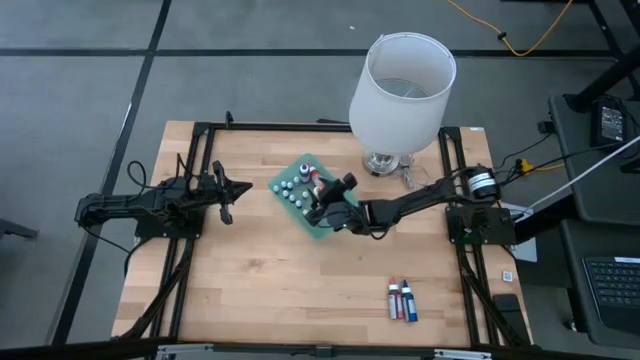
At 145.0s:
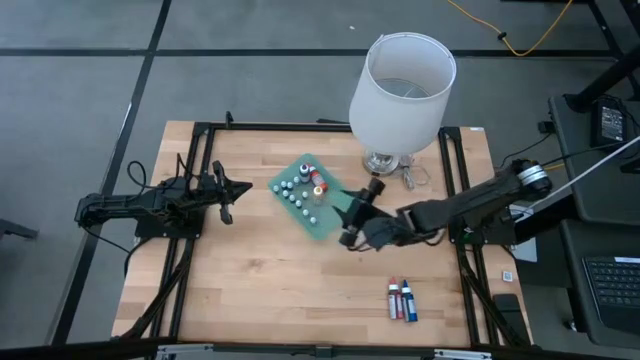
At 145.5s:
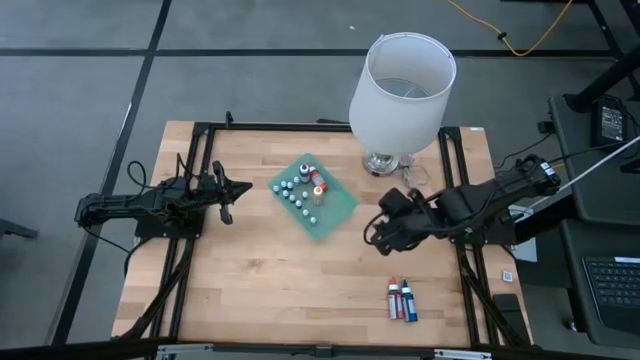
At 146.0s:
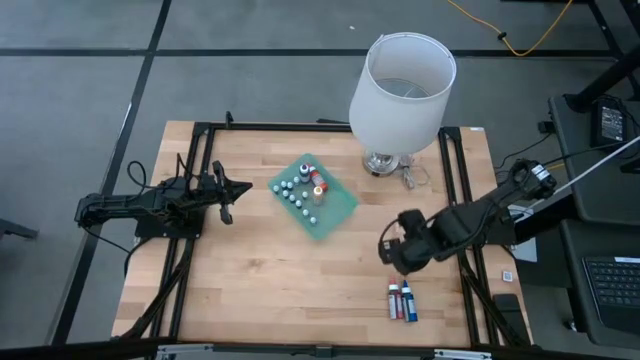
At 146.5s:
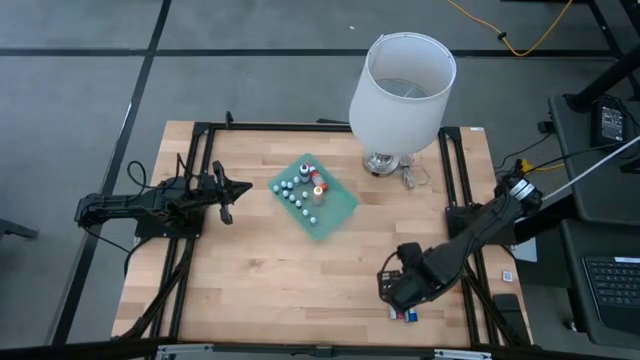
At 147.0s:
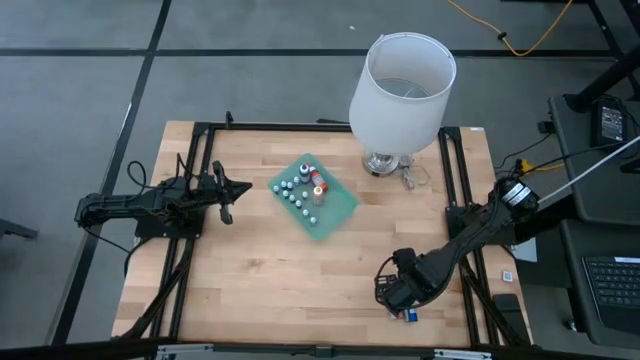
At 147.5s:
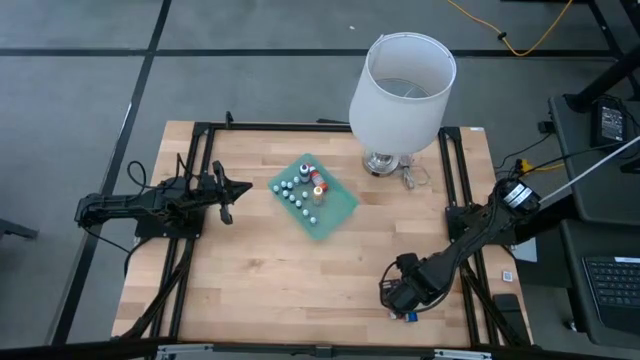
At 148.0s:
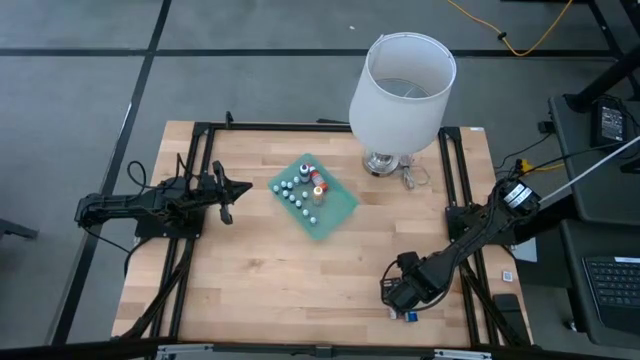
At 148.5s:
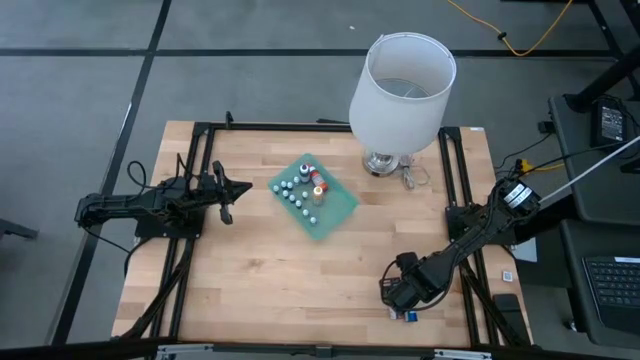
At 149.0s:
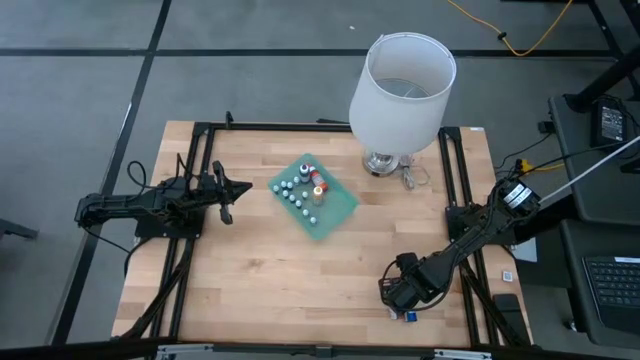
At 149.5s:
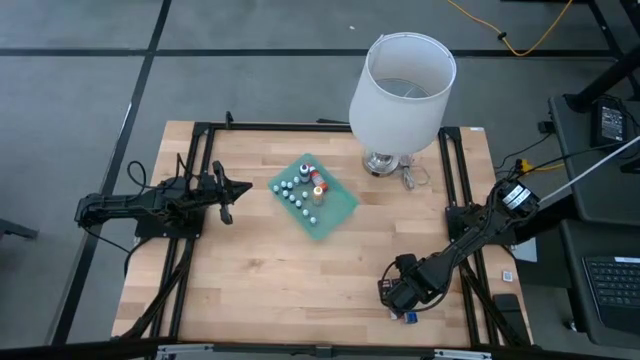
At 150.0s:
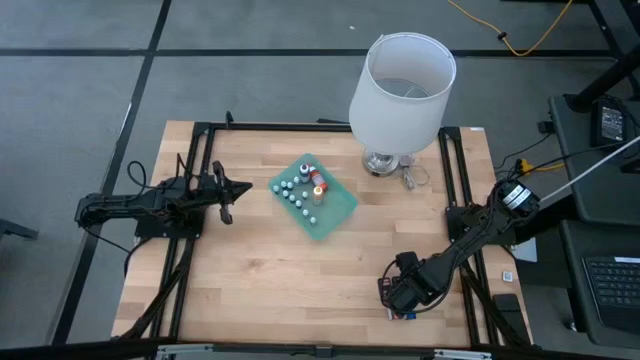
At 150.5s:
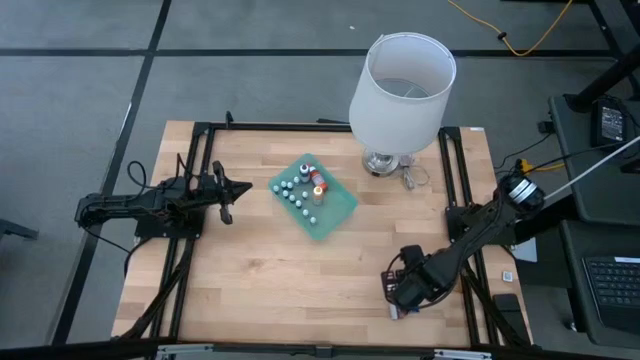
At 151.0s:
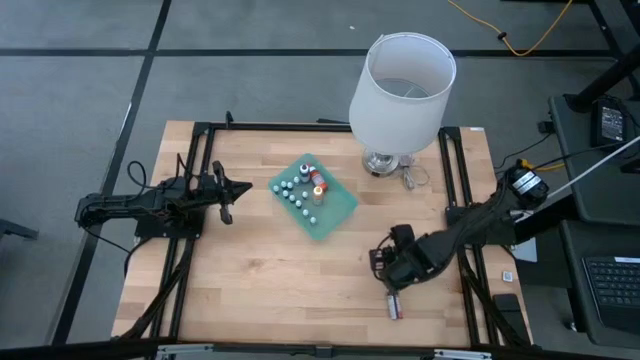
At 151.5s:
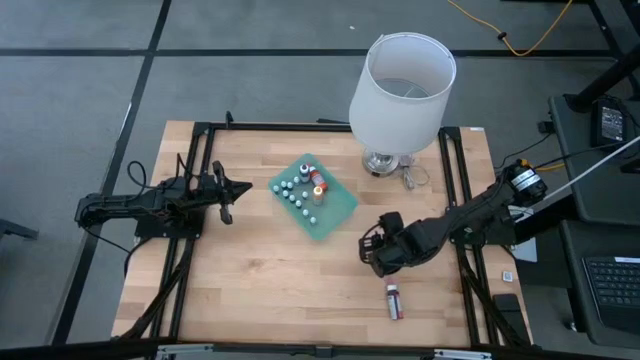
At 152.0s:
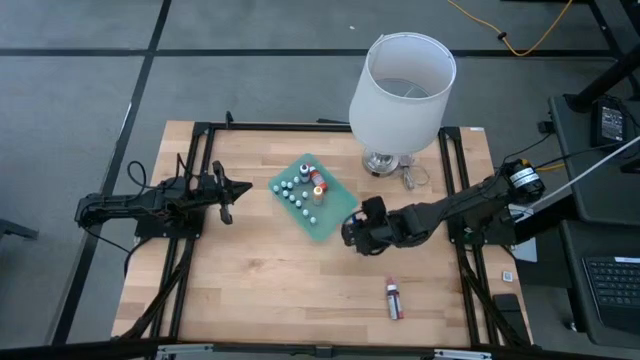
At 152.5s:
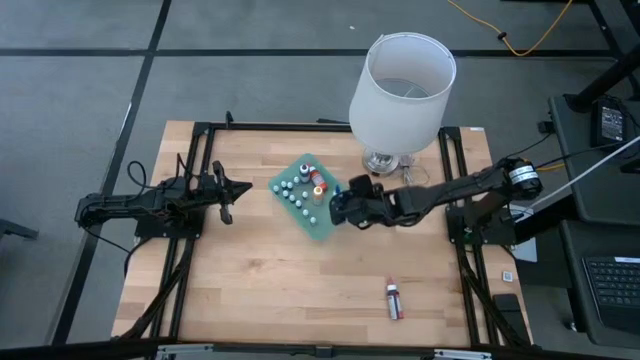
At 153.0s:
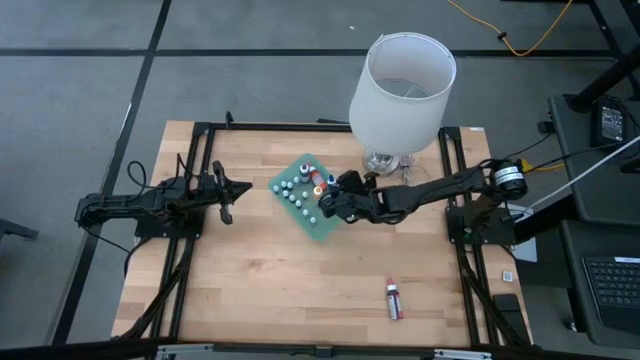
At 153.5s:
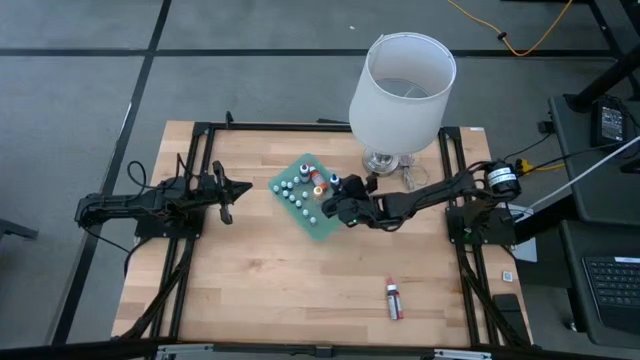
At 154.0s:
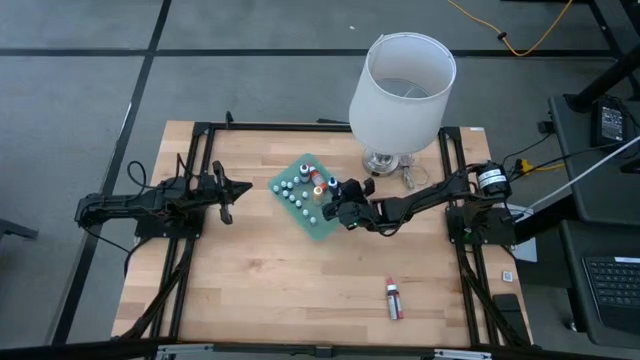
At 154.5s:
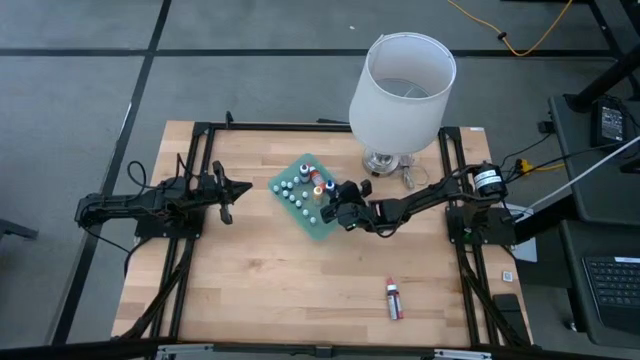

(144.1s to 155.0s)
Task: Pick & Place food coloring
Put the large blue food coloring bottle into the green bin

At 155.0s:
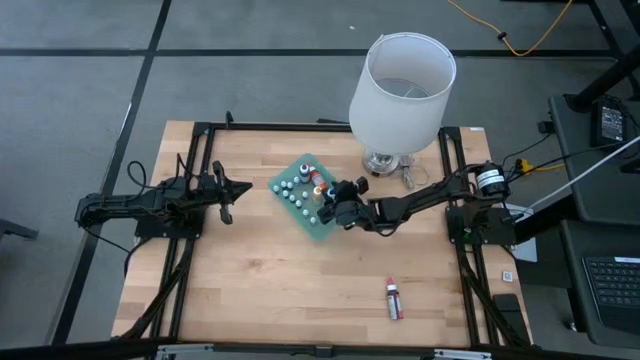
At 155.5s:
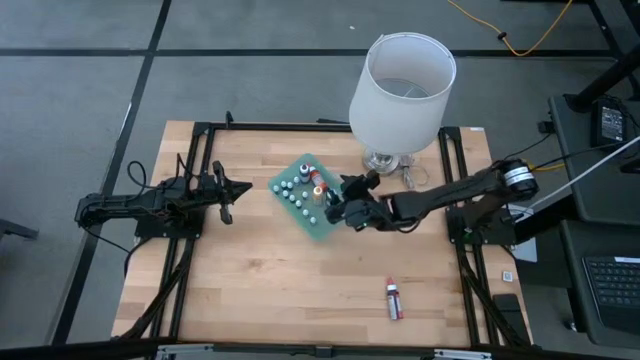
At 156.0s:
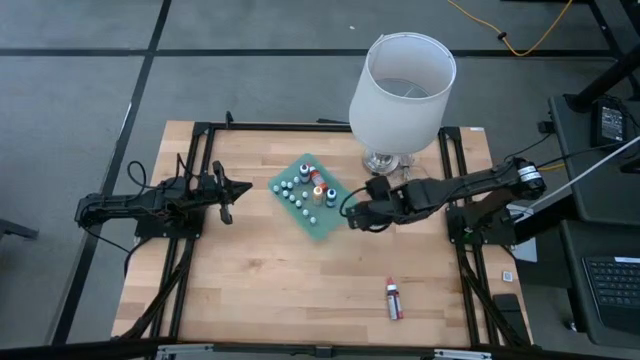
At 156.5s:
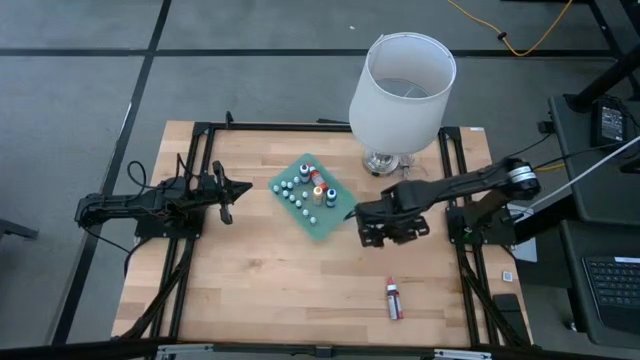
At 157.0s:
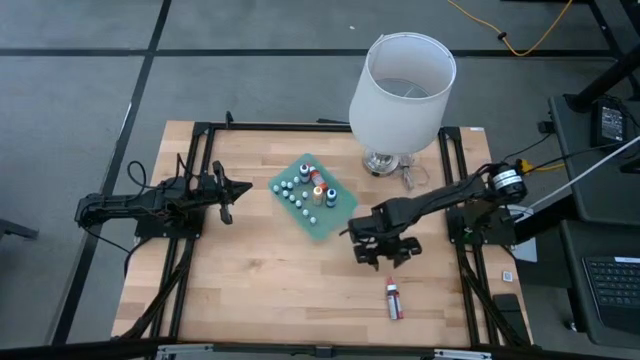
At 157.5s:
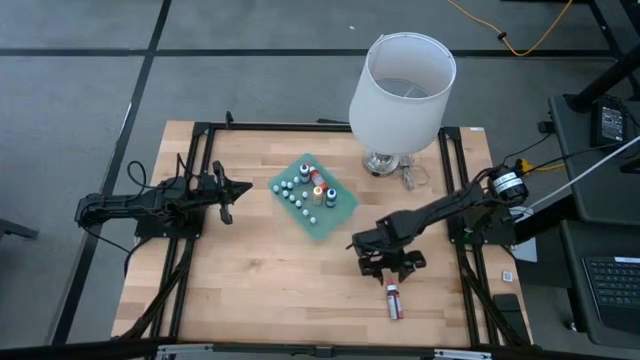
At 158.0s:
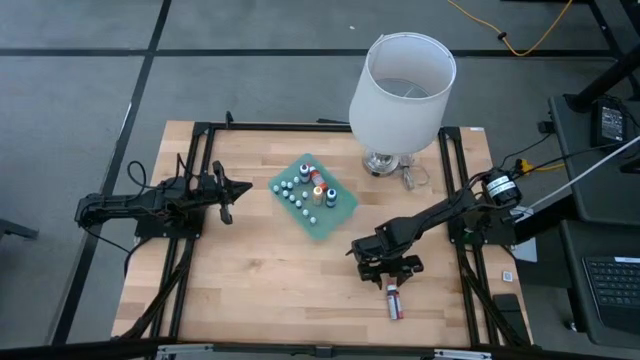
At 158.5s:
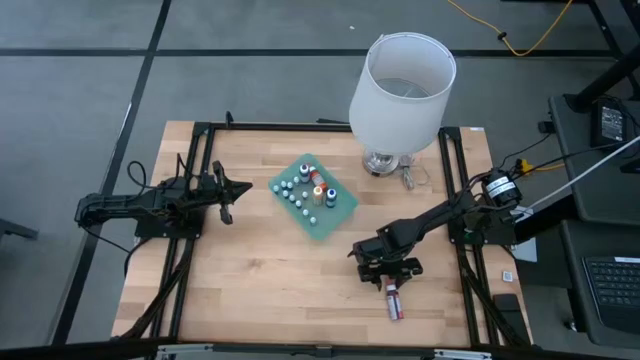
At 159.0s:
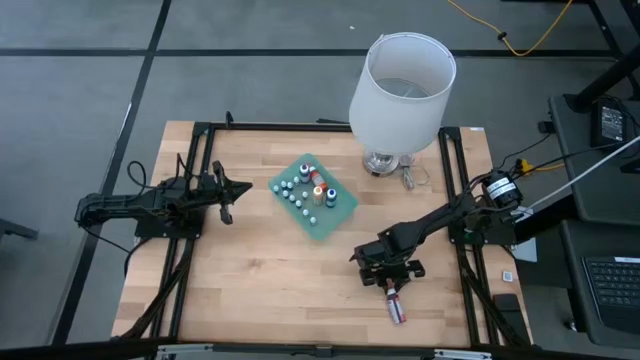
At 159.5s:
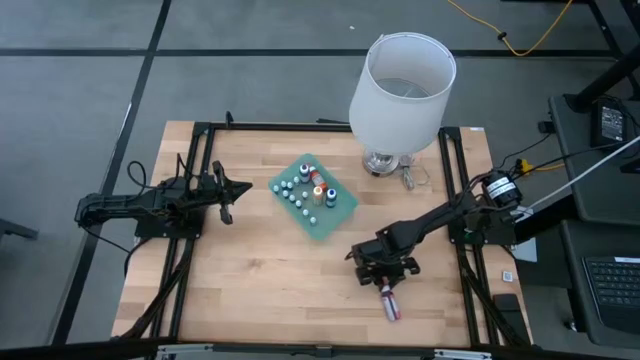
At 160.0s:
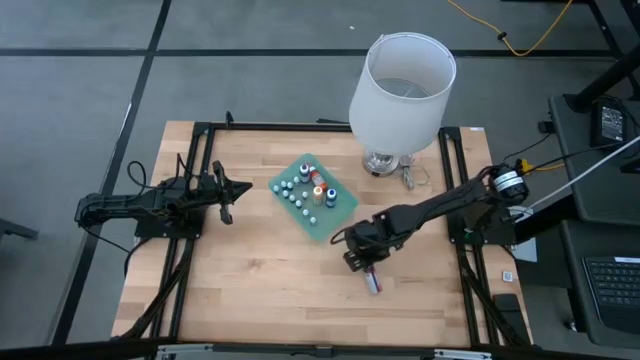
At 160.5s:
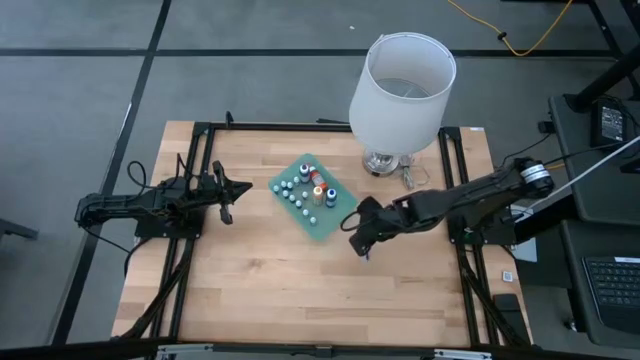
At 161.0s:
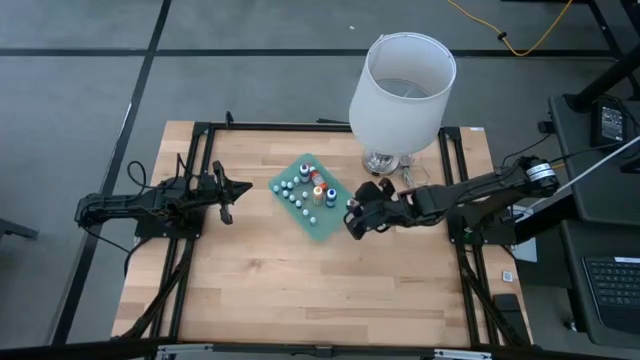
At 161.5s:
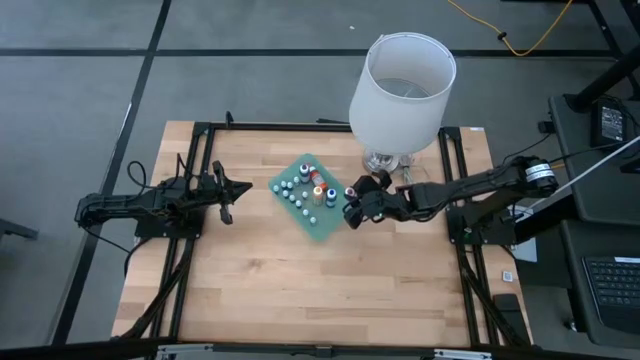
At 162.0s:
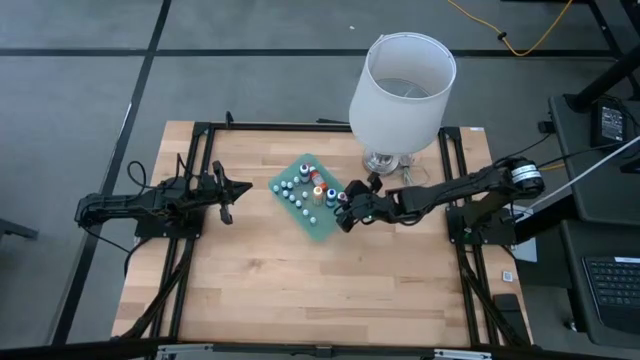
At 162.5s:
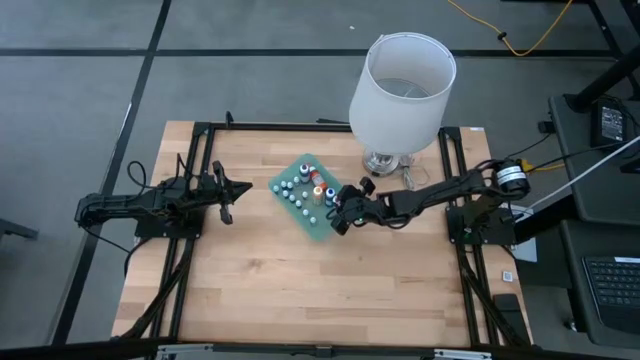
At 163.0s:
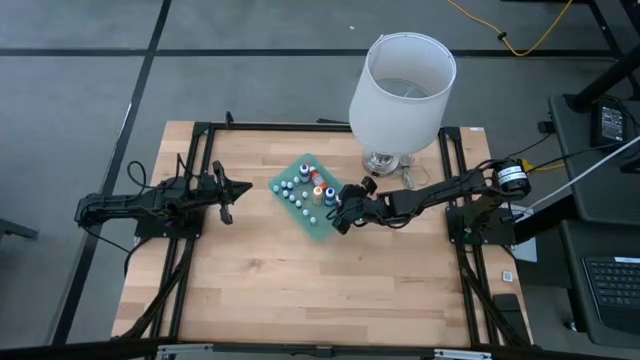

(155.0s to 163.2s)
Put the large pink food coloring bottle into the green bin

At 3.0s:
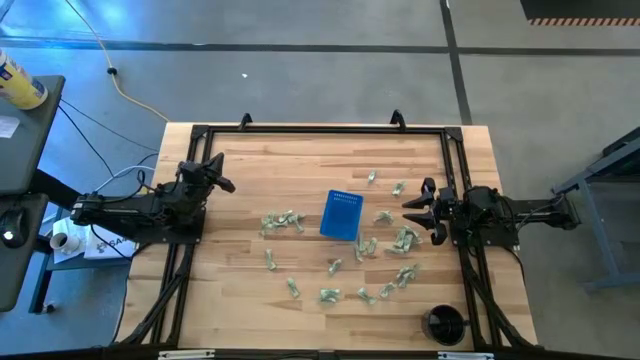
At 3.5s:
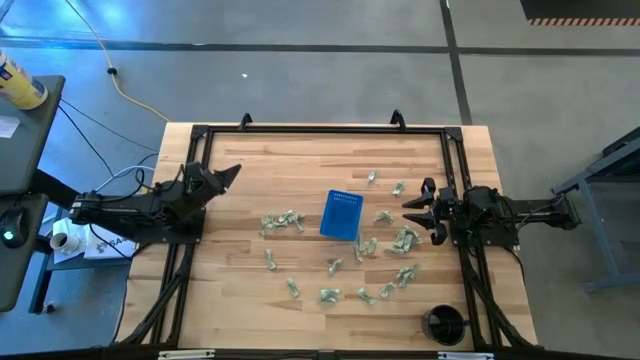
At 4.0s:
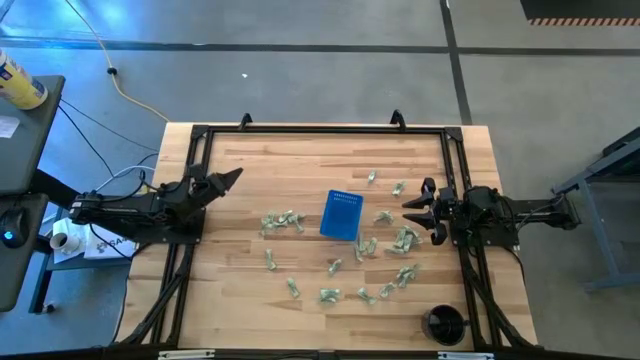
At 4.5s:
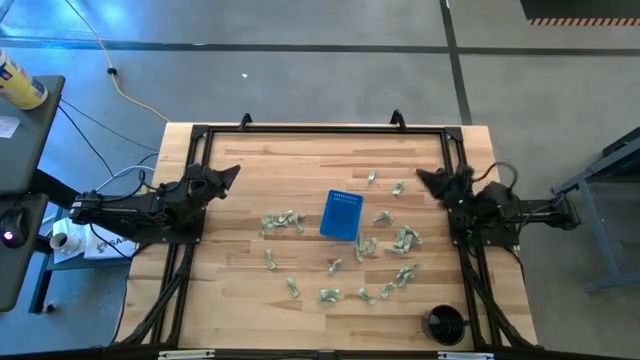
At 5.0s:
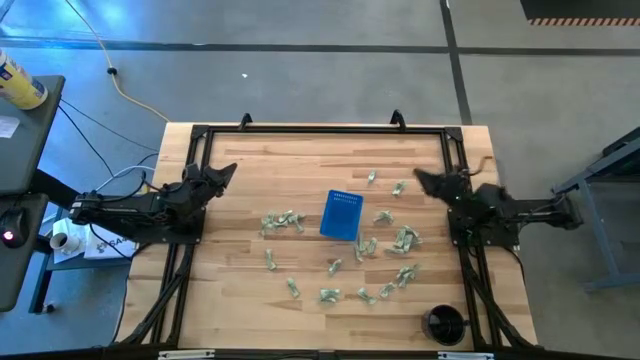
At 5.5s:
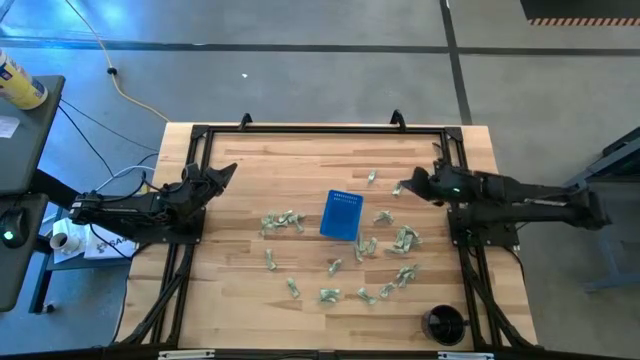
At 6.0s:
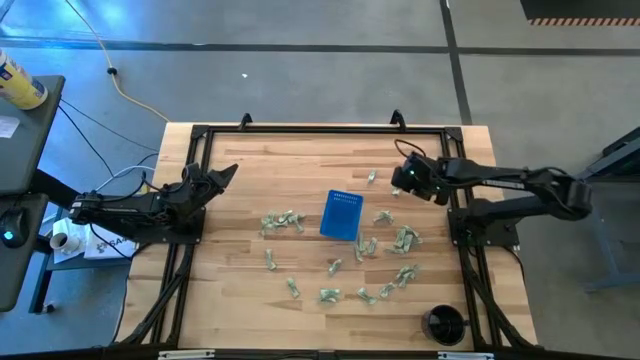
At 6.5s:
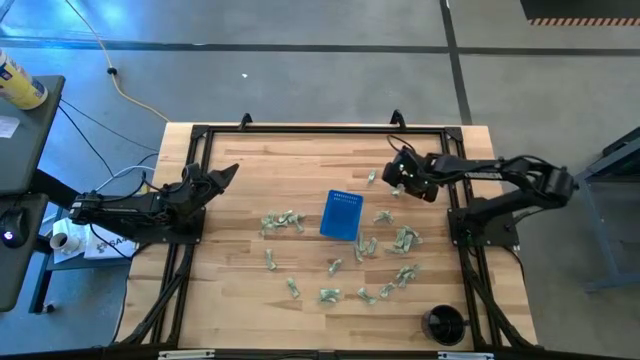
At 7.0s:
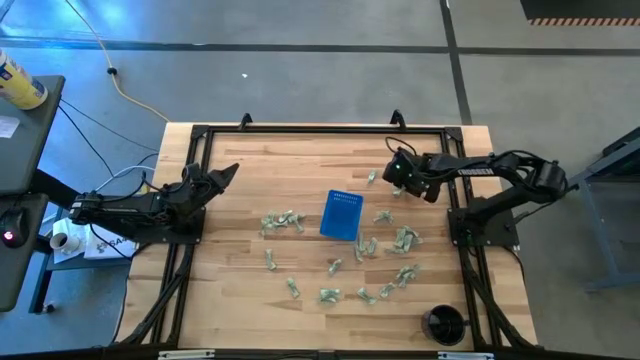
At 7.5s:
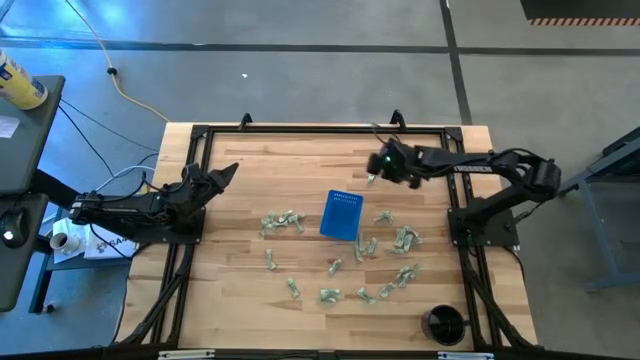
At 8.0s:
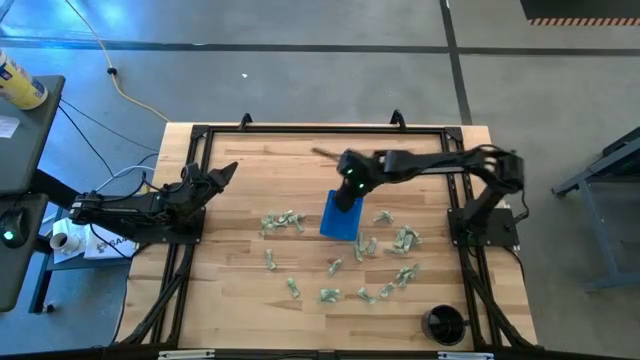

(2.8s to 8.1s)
Task: Pick and place Stevia / Truvia into bins
Put the stevia packet into the blue basket
